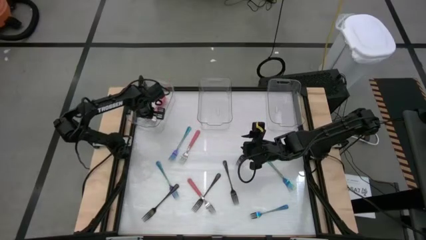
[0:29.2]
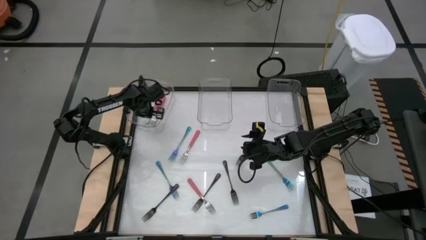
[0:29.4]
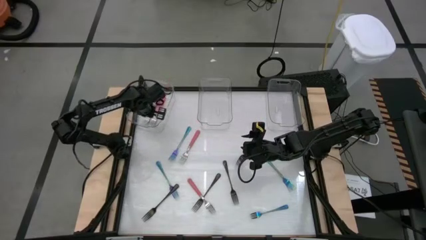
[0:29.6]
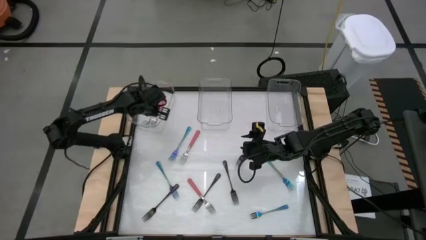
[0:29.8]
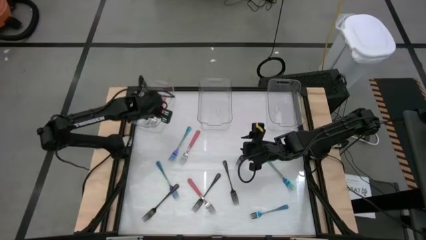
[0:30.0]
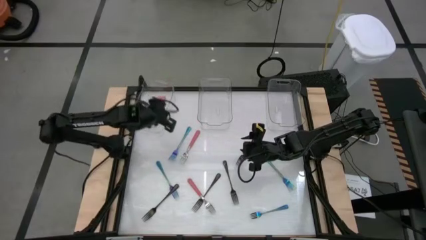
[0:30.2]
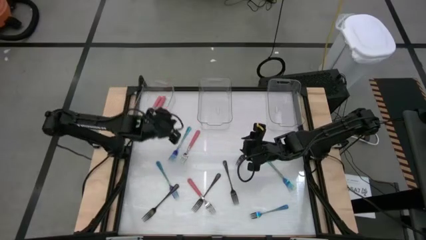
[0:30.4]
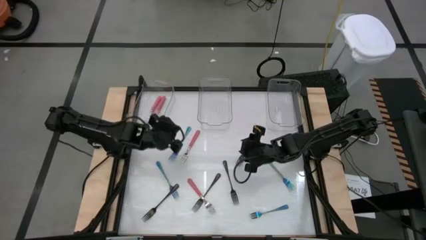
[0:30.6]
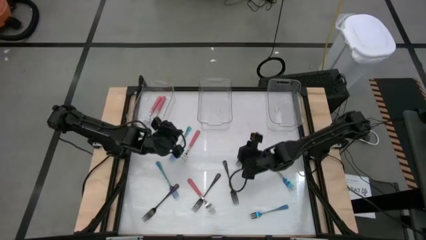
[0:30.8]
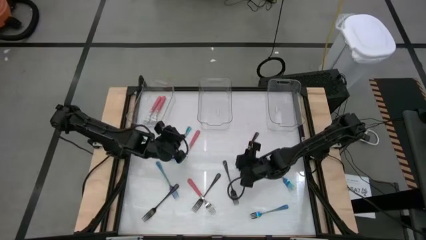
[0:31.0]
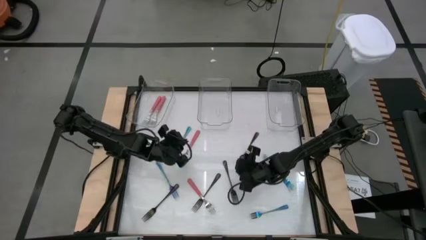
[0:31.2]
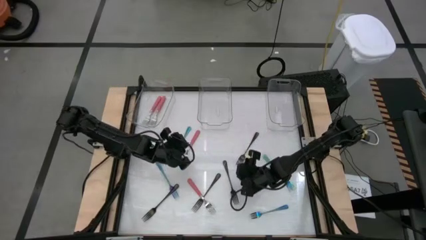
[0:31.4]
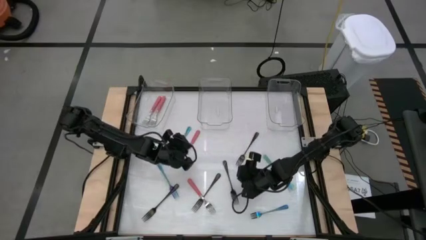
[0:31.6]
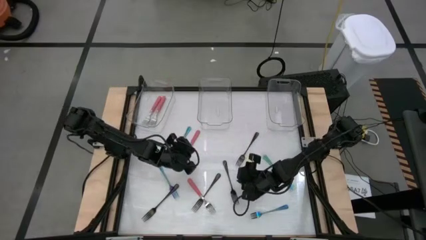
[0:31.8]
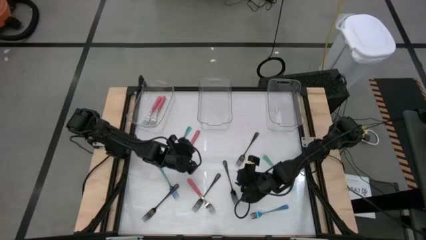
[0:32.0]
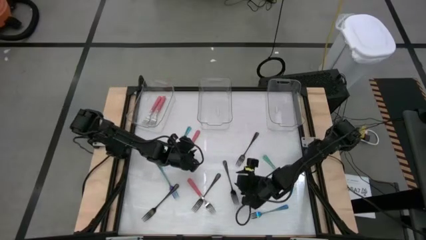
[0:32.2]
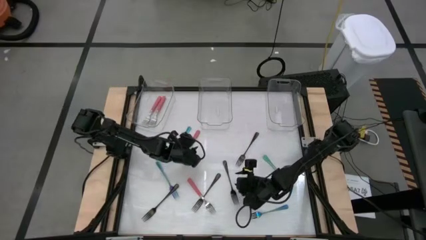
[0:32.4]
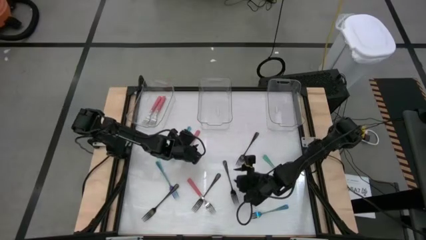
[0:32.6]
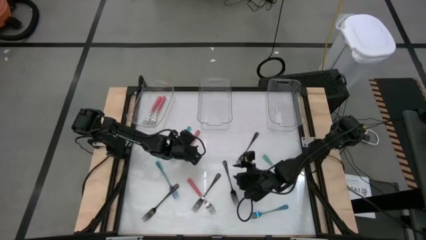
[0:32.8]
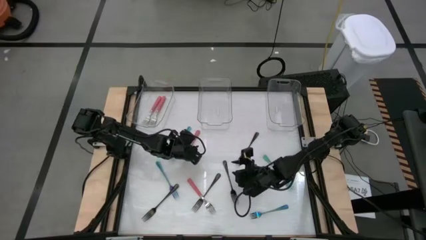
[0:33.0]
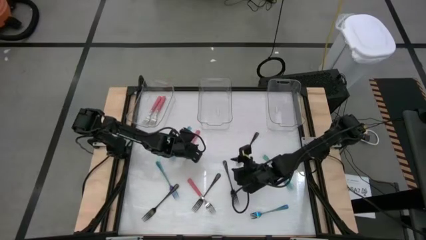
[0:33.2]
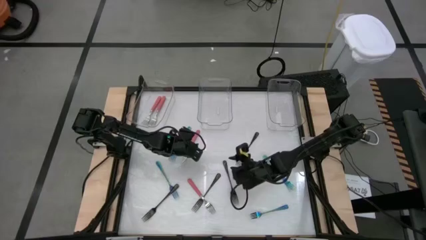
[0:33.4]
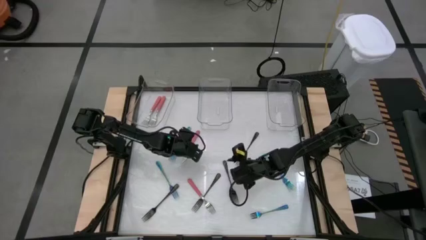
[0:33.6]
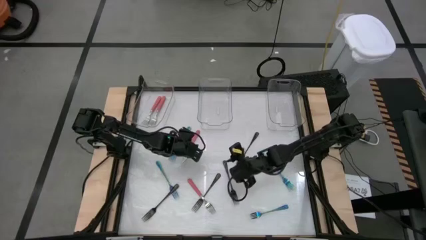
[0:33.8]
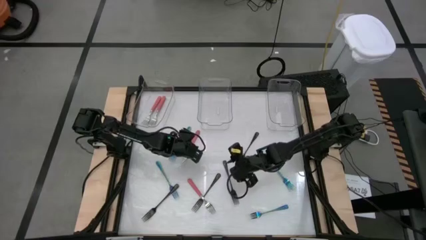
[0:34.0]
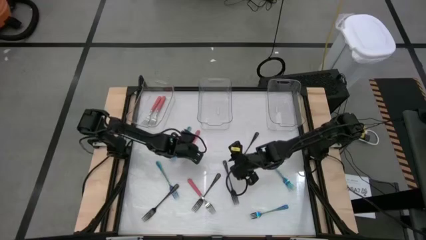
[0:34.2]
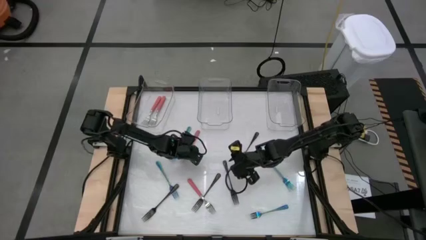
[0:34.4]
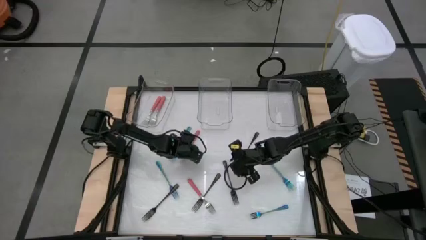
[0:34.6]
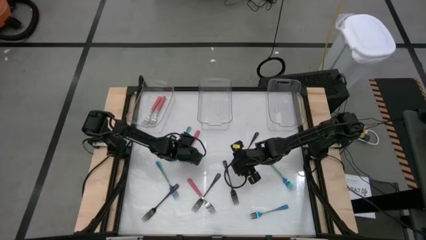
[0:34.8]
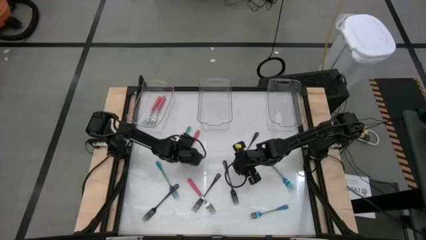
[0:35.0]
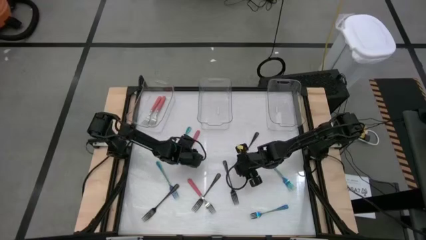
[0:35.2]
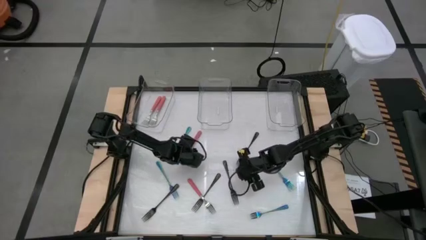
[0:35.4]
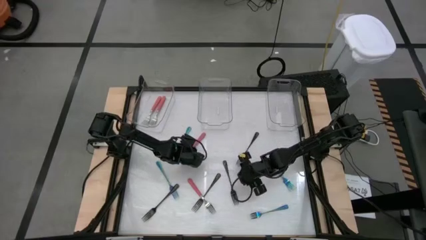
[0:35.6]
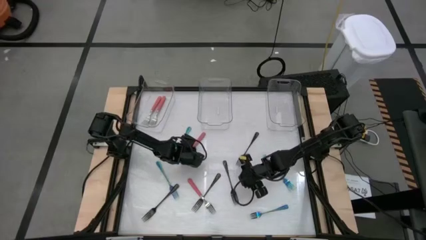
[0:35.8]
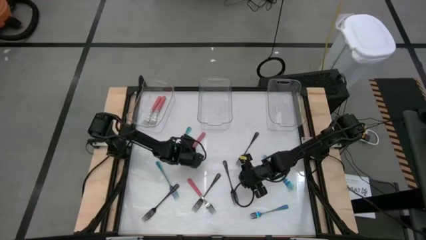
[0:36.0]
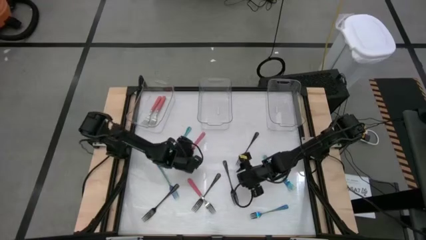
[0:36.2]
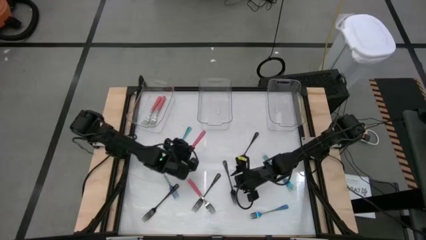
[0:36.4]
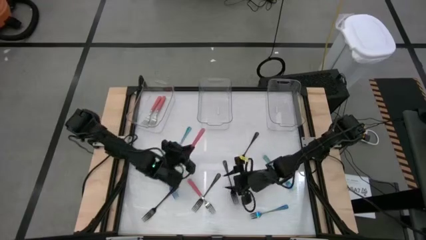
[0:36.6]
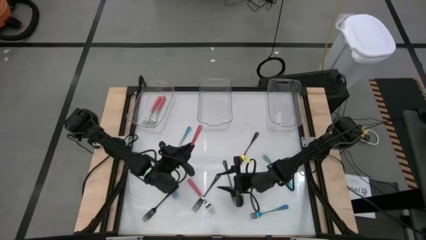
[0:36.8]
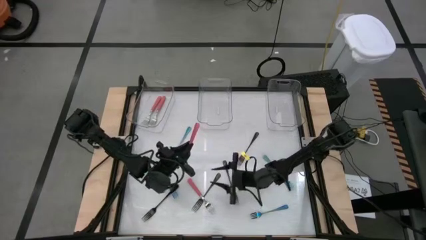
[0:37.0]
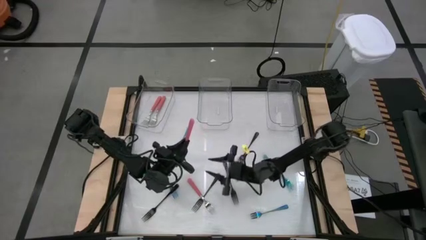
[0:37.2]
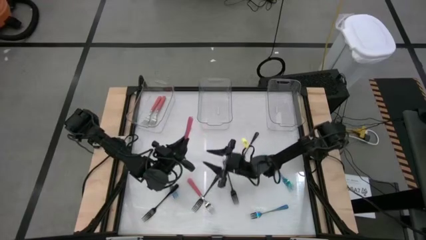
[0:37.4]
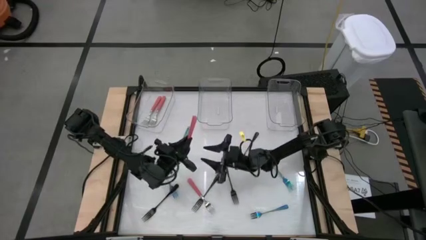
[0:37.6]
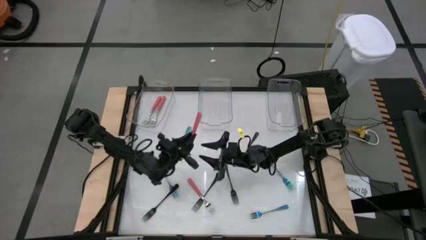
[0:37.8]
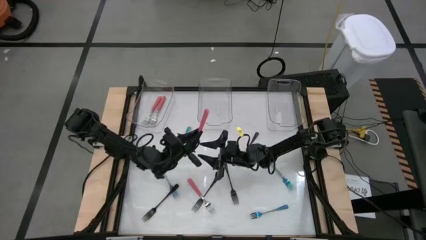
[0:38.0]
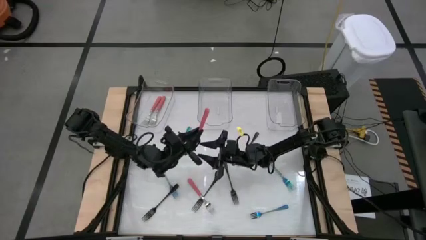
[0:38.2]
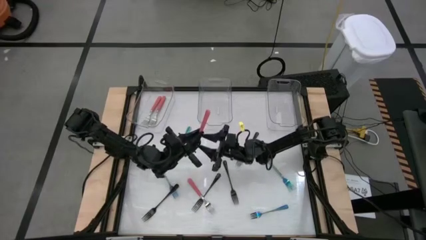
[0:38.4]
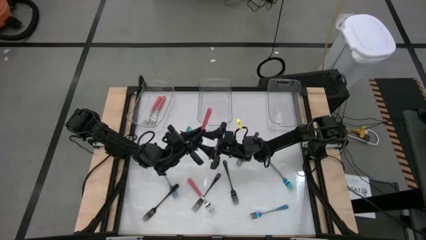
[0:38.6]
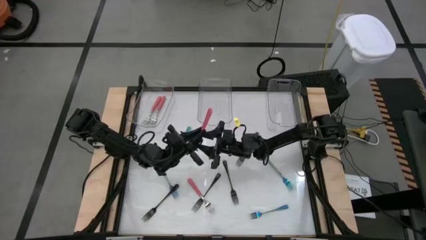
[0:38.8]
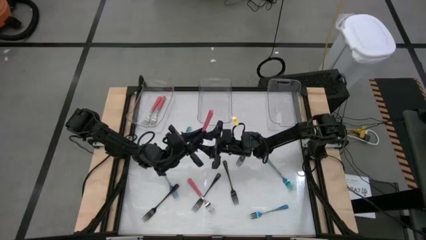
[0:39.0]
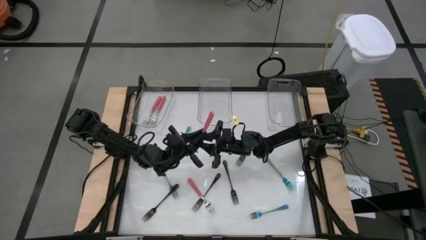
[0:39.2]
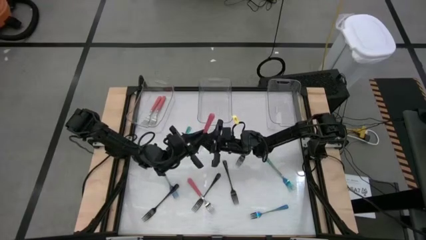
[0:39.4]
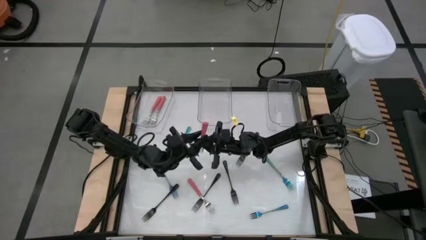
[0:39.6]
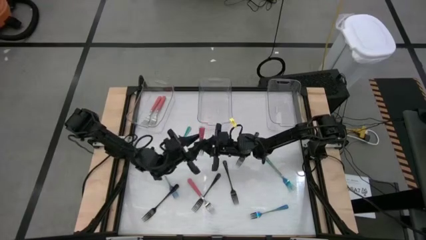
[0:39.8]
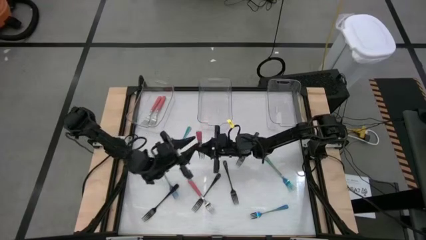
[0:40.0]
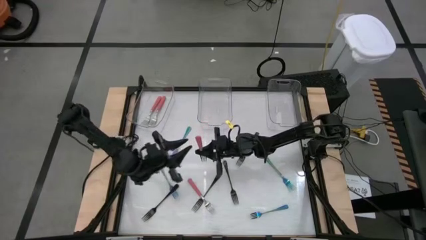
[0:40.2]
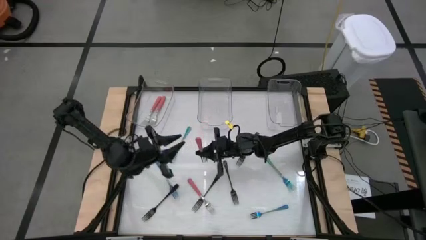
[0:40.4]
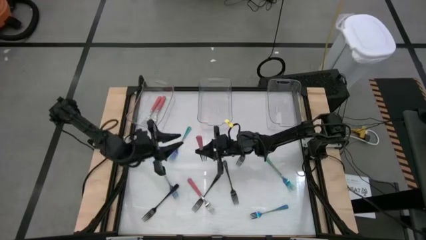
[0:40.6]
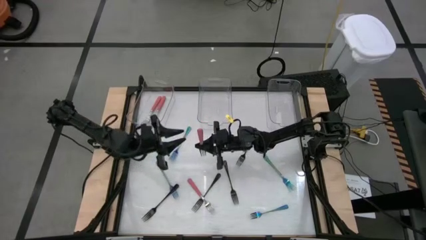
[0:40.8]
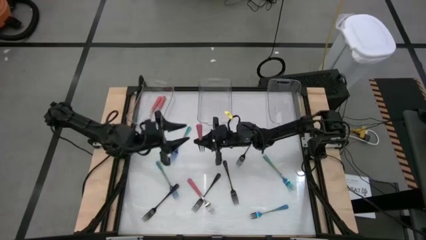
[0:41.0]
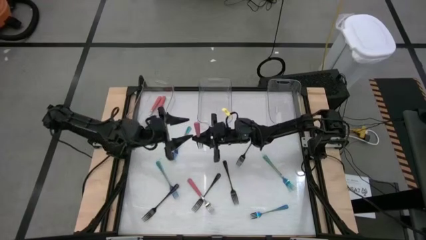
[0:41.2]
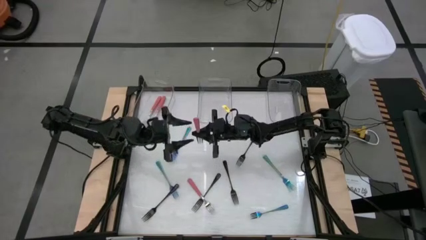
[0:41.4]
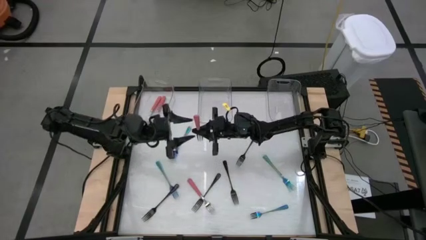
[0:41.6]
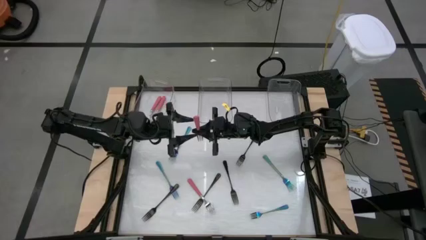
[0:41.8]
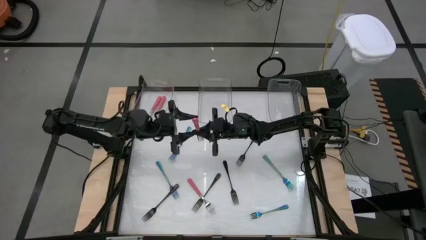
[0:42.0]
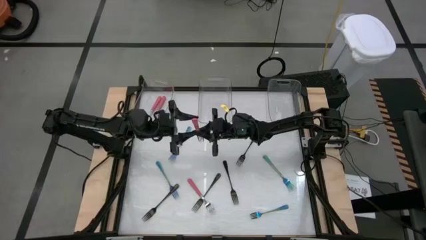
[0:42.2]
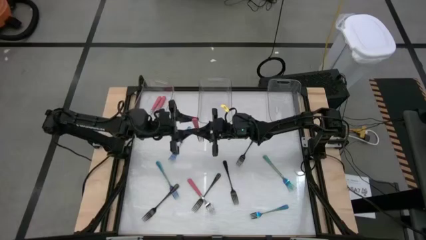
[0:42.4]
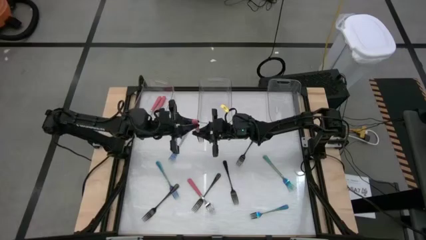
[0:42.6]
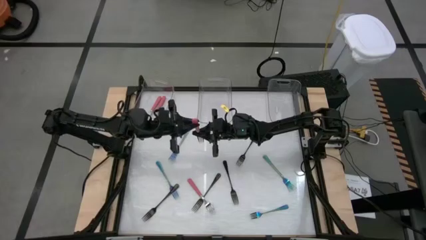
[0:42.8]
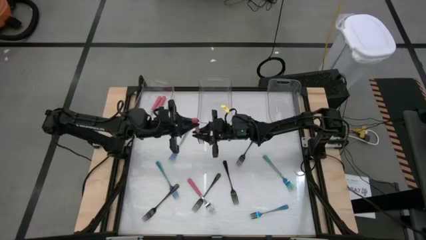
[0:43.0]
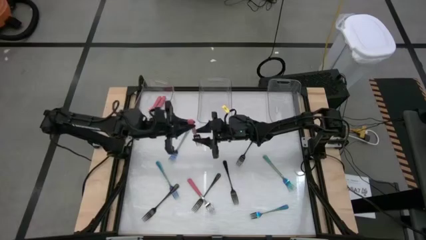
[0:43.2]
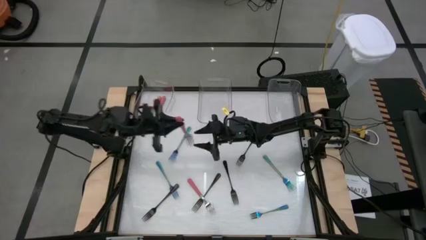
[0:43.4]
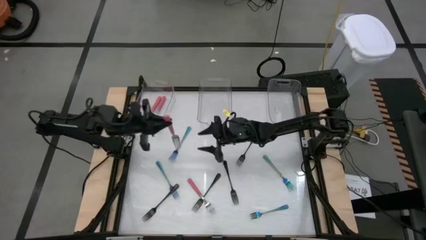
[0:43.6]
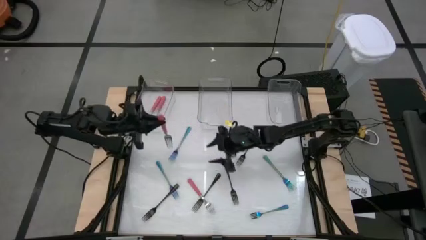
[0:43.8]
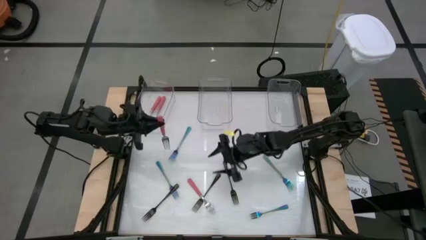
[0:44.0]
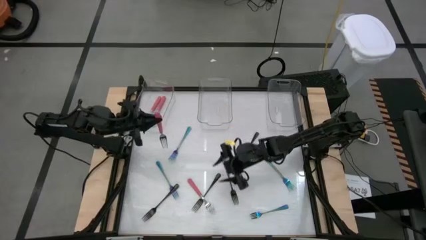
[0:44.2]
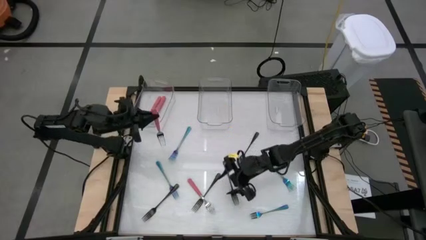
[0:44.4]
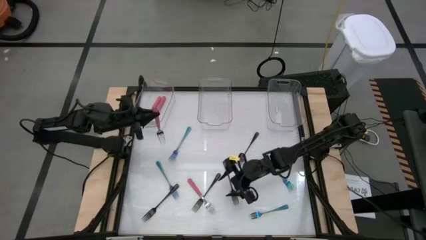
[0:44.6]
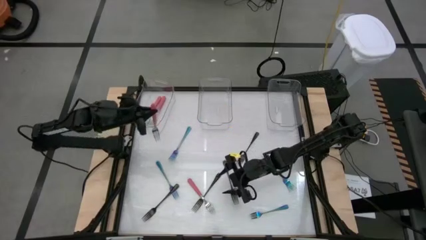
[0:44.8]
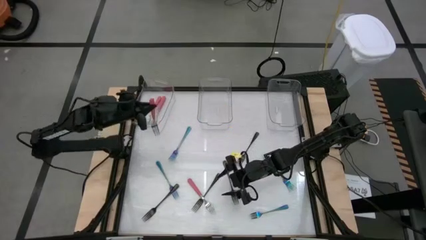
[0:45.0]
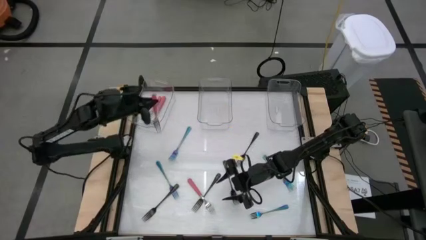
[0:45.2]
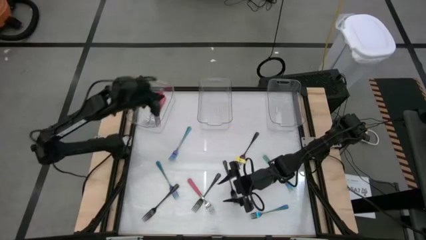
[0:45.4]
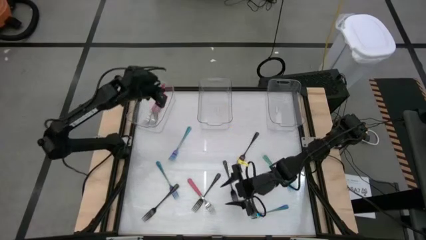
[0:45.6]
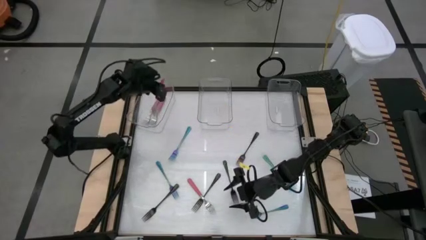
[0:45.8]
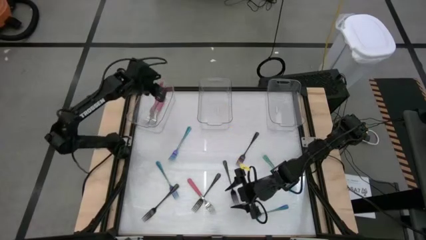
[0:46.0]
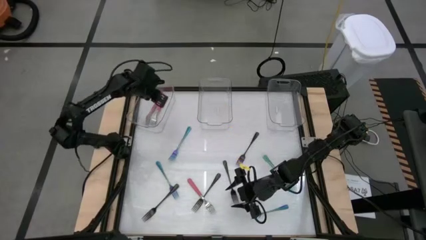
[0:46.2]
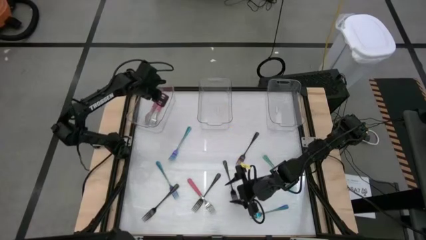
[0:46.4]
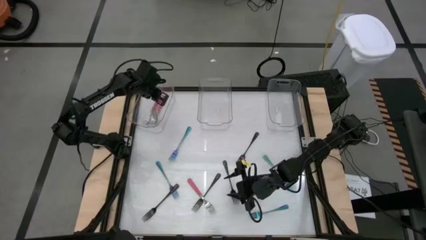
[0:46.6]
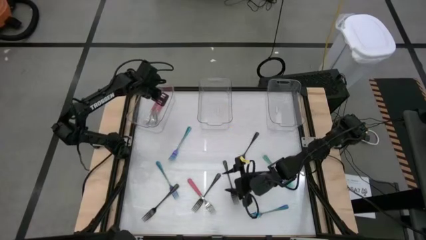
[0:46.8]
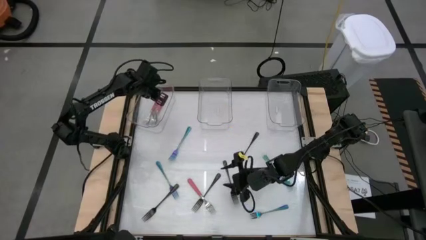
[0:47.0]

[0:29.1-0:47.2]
Task: Sort silverware by color (type)
Put the pink fork into the left transparent bin
